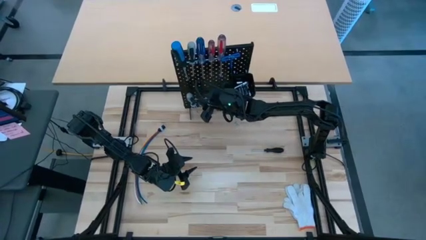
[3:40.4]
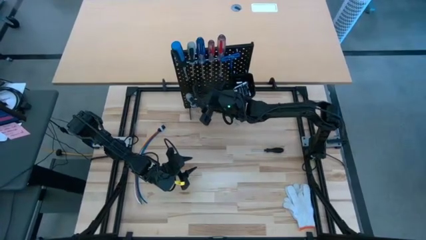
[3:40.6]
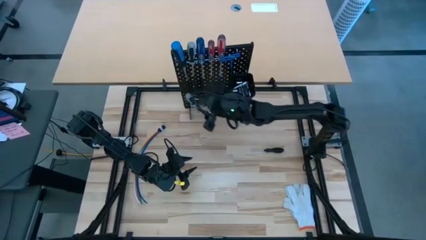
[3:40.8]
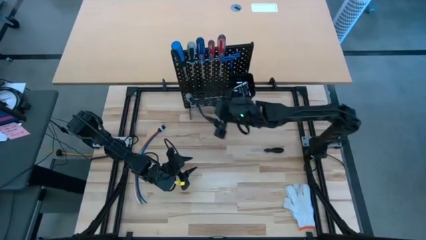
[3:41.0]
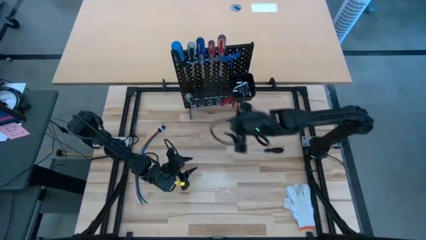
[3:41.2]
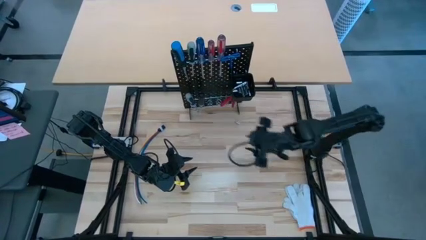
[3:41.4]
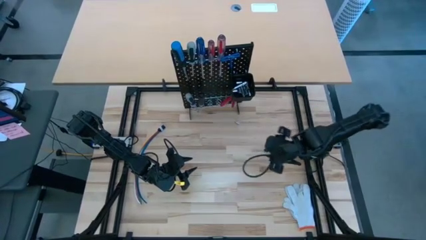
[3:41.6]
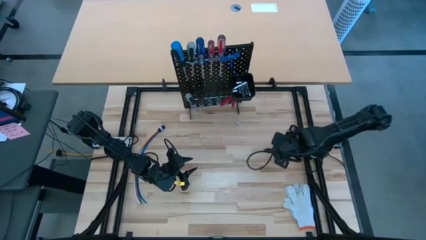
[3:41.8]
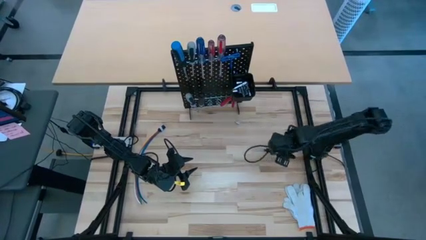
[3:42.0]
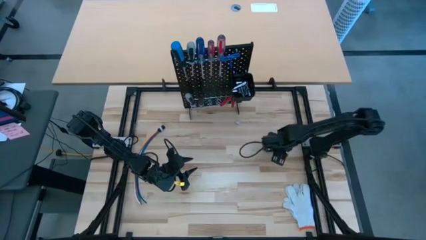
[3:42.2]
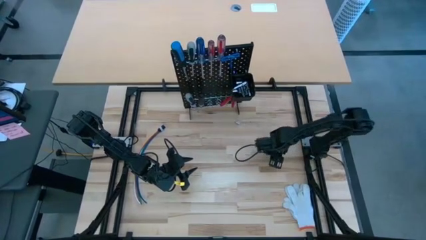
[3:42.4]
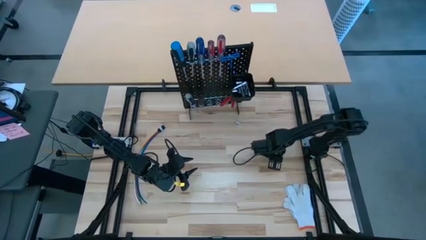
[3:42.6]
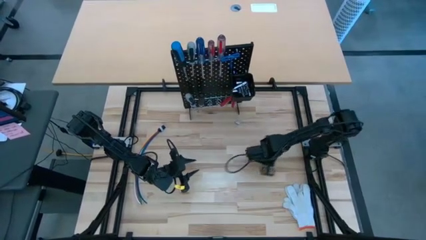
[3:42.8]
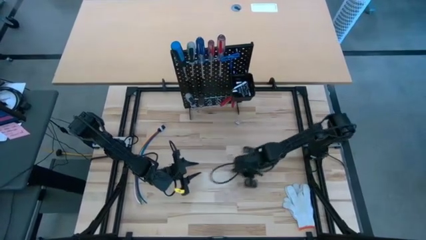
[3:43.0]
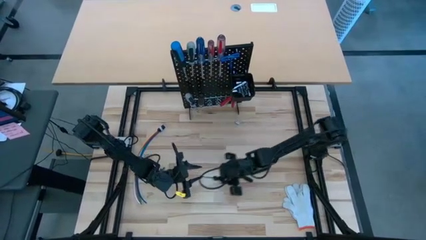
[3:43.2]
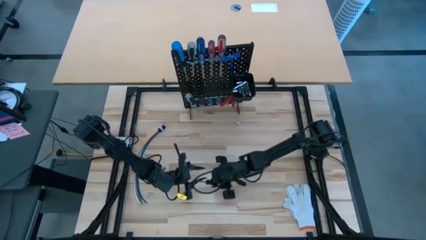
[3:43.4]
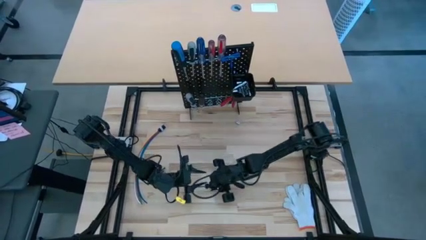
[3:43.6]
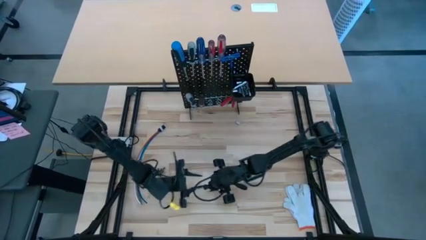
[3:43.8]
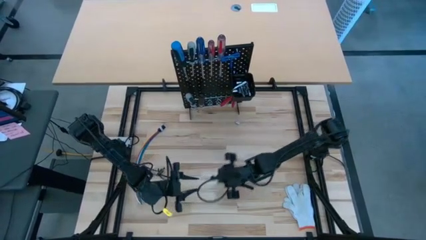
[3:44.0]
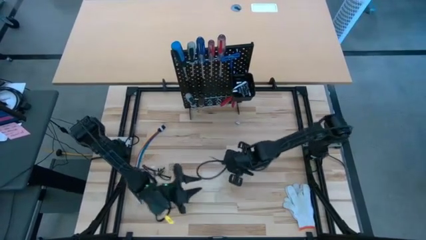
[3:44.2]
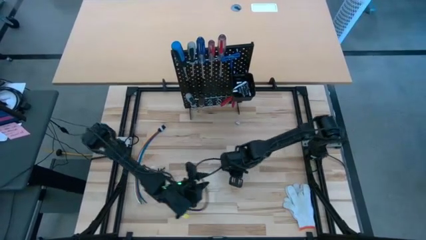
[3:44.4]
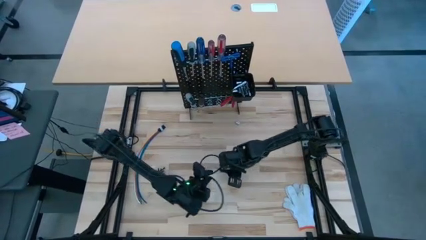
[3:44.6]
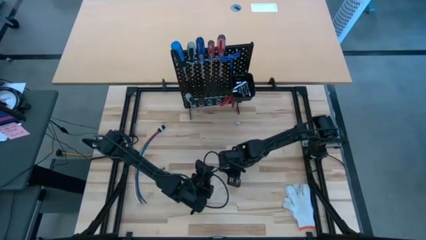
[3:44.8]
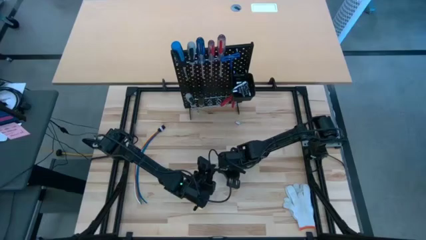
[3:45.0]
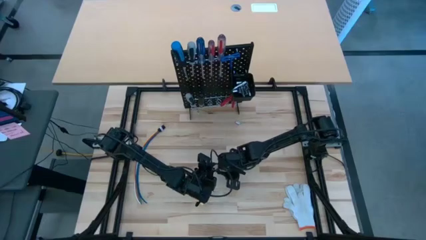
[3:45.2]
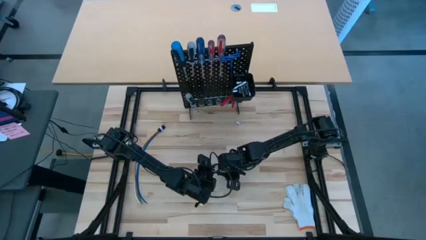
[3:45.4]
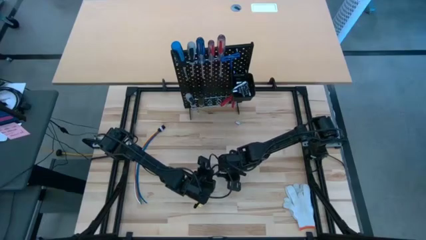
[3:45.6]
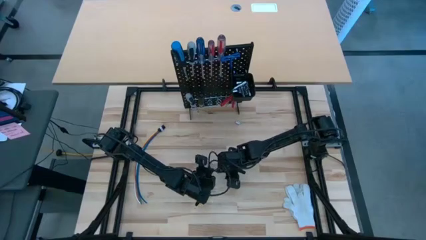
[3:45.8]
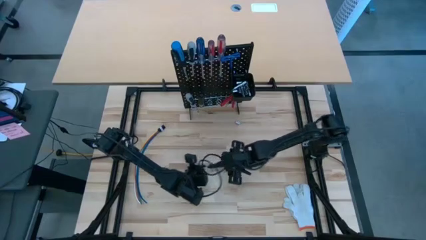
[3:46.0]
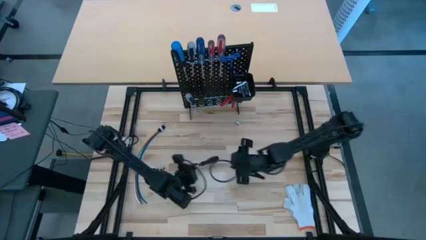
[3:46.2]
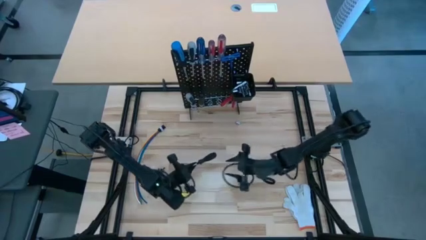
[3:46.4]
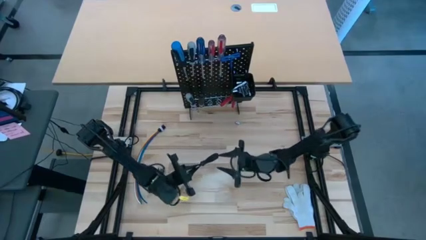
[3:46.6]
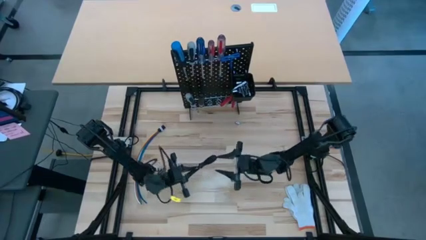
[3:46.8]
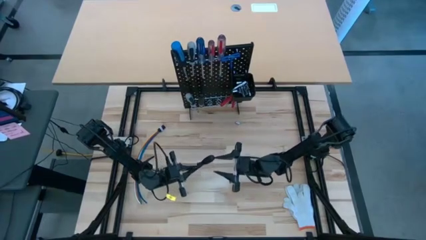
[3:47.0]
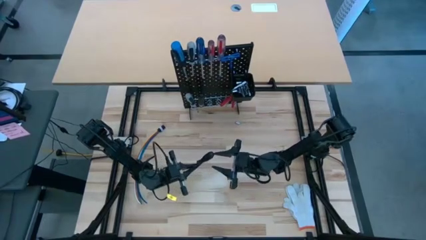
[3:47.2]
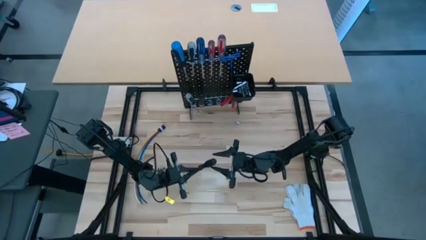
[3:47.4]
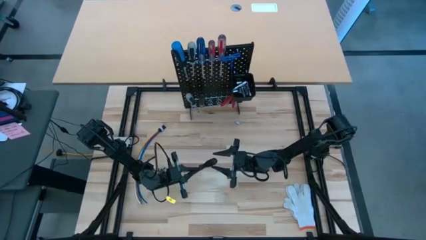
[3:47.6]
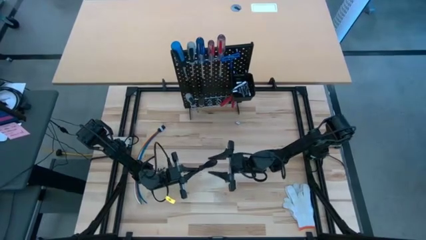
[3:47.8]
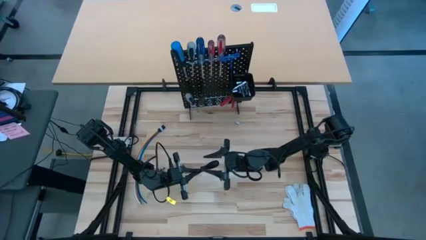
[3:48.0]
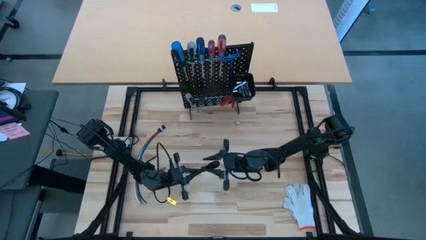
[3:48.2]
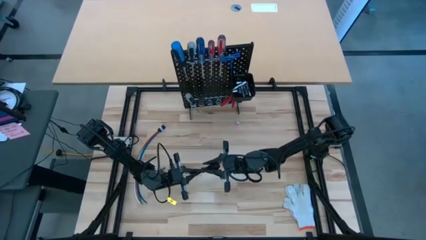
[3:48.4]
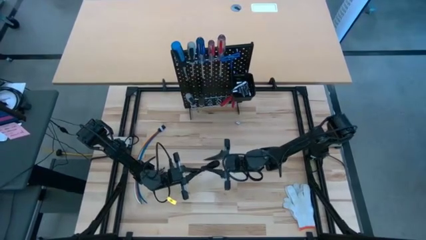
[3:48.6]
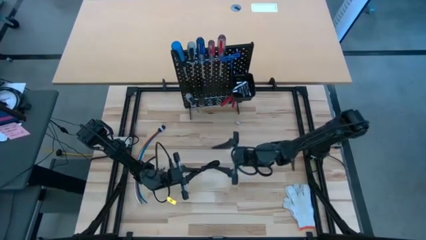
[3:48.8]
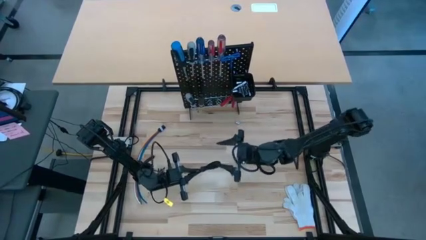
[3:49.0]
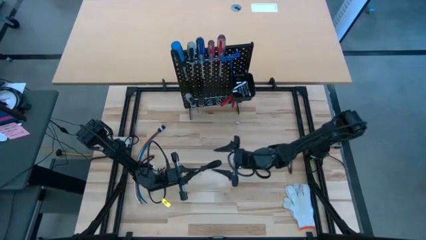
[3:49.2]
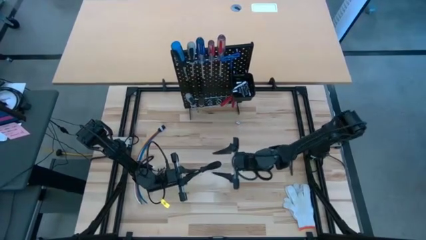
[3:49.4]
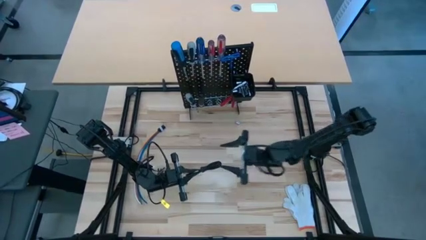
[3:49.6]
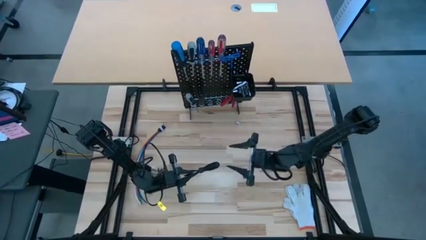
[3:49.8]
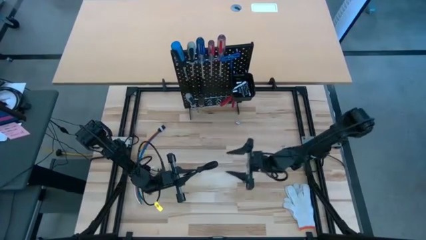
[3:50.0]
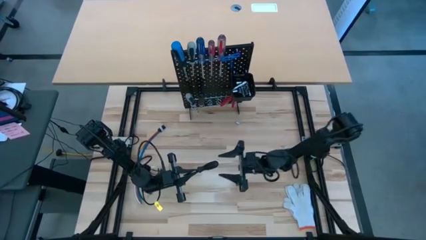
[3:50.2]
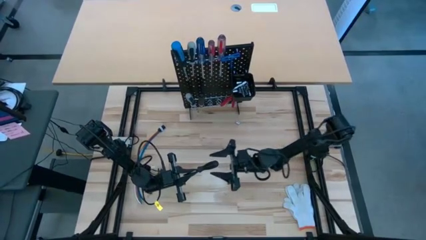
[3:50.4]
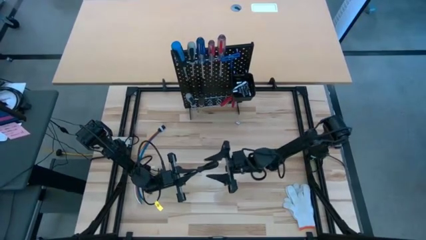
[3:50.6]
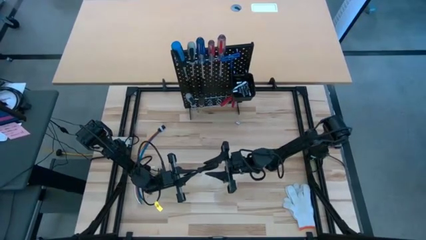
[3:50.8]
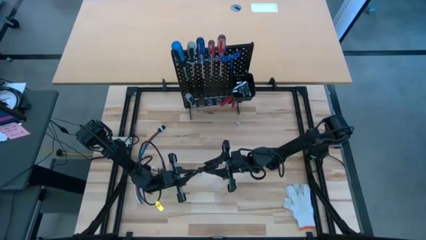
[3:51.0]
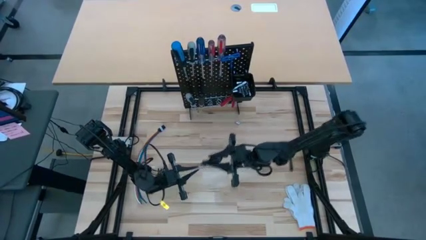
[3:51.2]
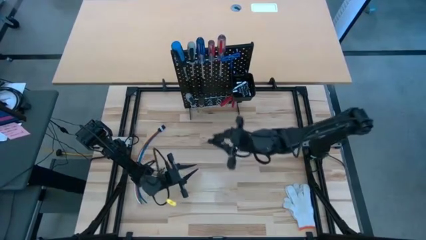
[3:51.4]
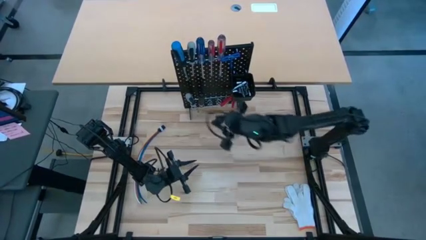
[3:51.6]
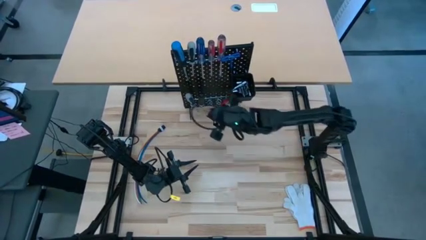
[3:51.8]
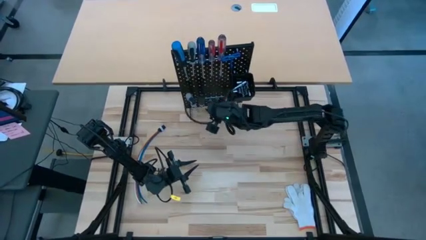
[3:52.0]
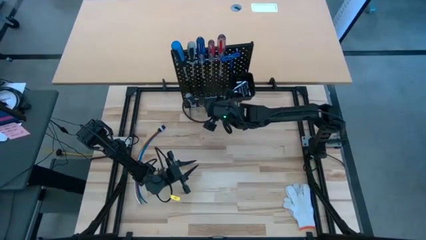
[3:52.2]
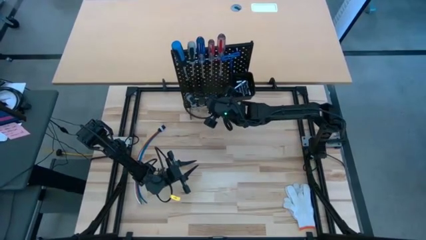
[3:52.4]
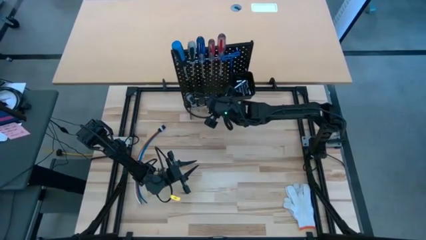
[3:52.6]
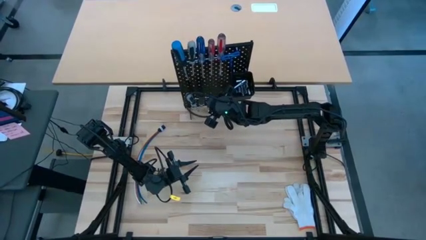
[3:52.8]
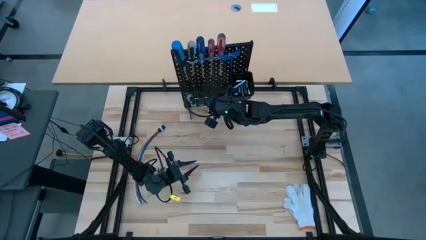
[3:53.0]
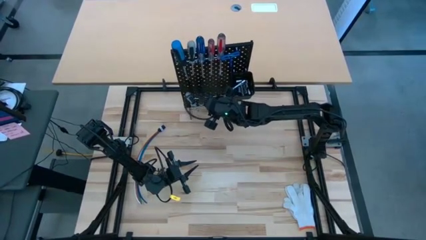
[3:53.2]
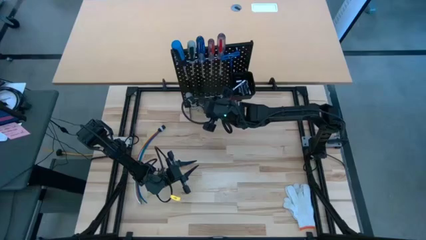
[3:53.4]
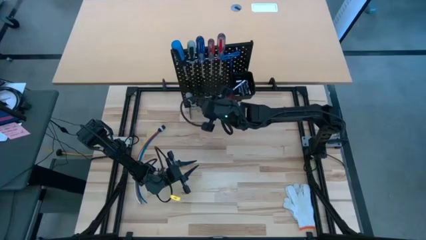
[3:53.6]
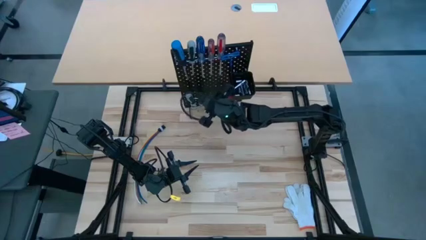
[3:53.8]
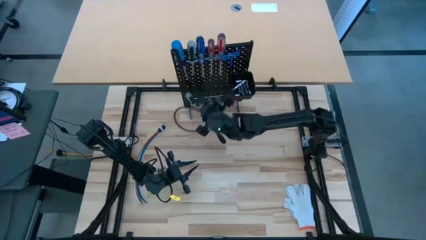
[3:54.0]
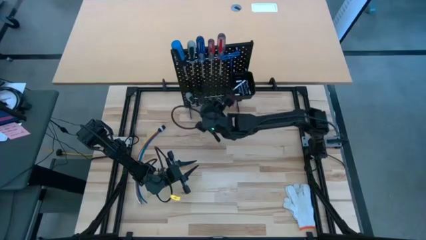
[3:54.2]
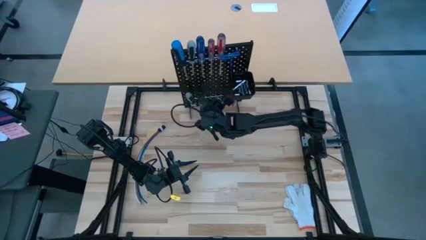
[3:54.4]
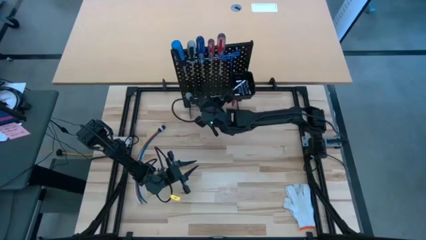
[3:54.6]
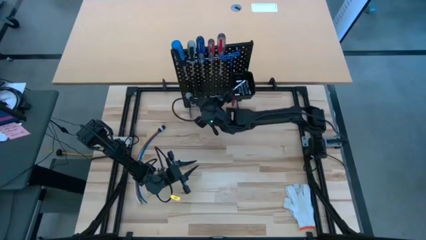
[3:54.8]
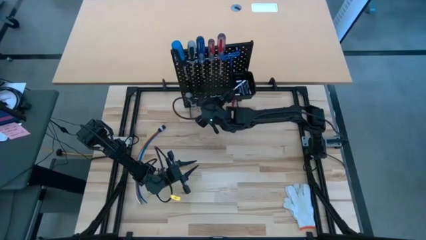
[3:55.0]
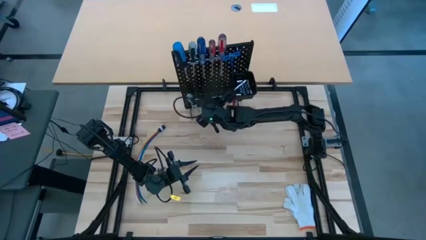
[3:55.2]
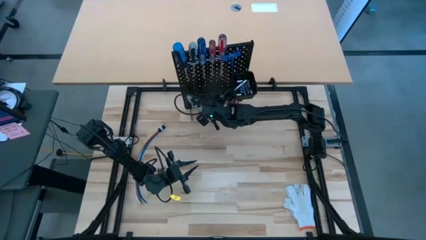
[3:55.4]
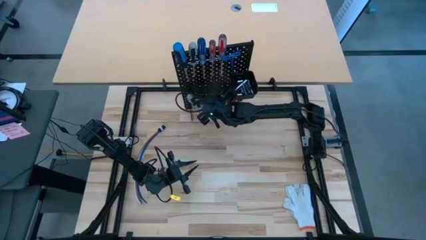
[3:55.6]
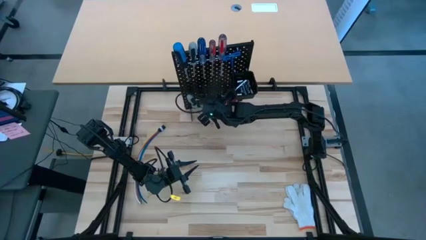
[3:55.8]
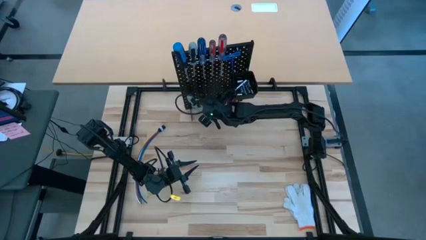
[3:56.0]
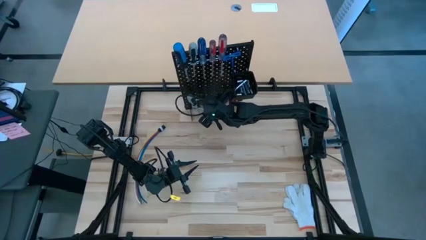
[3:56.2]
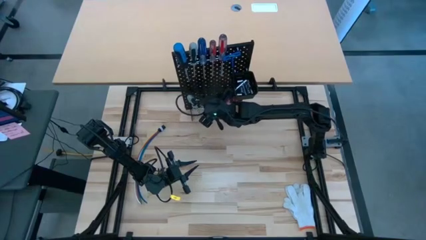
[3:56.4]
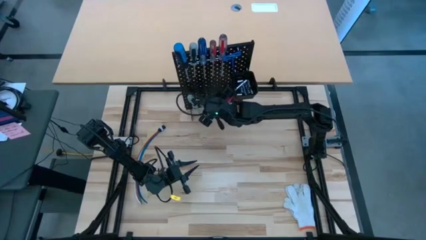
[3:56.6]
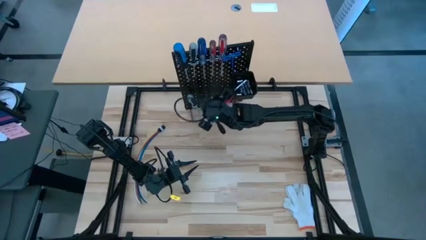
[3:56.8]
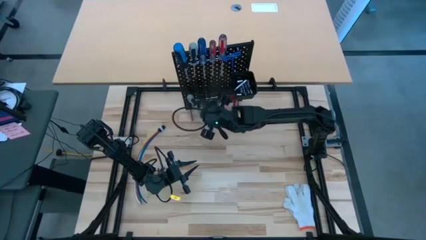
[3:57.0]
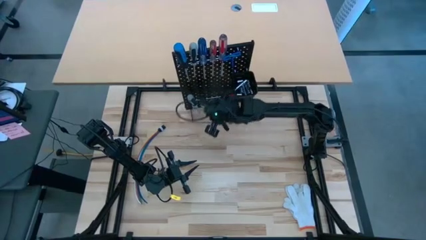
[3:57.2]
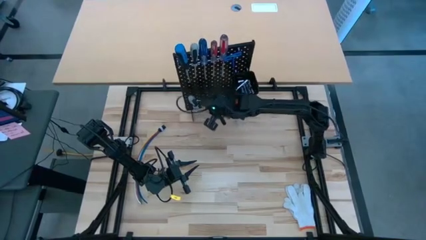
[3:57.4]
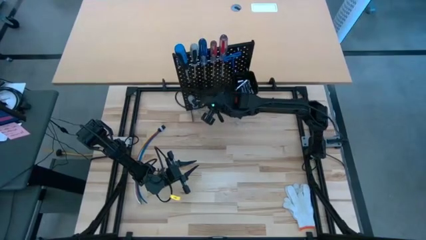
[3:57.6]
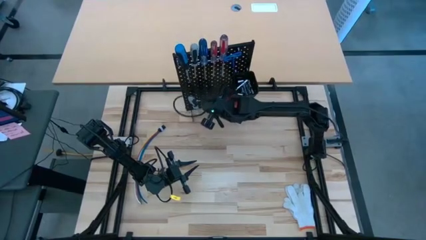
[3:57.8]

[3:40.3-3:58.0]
Task: Hang tools onto peg board
Hang the black screwdriver on the pegboard
